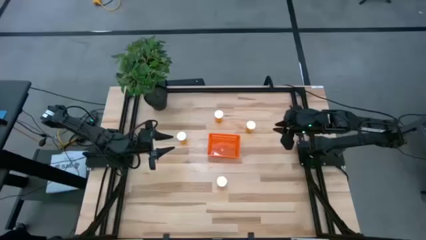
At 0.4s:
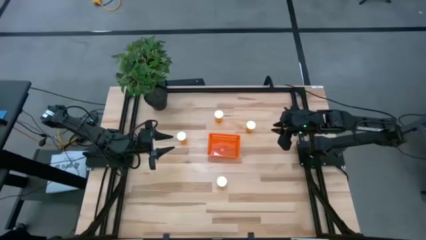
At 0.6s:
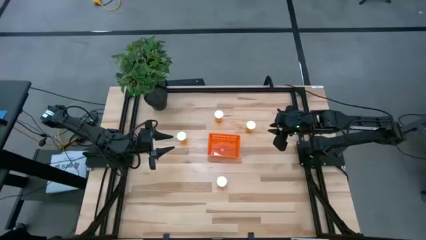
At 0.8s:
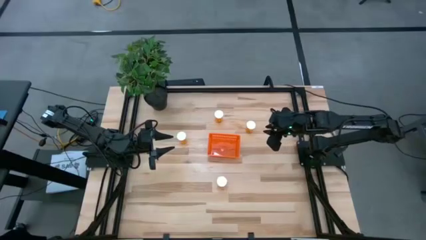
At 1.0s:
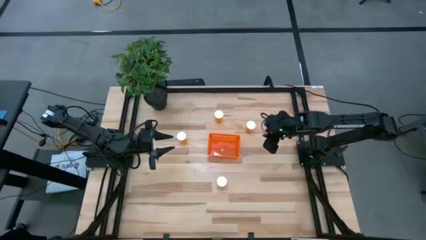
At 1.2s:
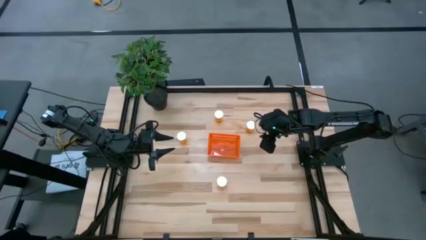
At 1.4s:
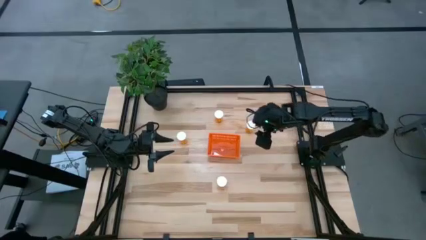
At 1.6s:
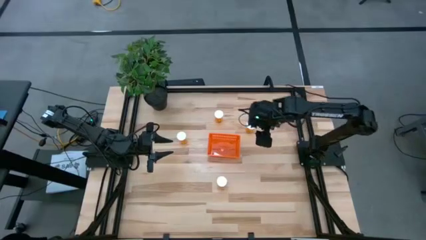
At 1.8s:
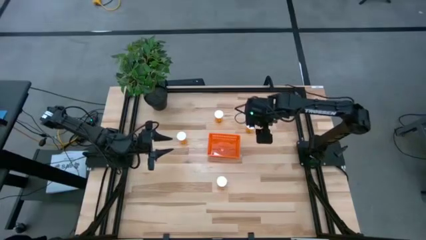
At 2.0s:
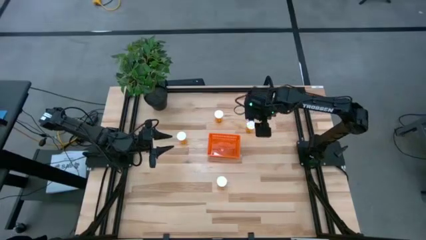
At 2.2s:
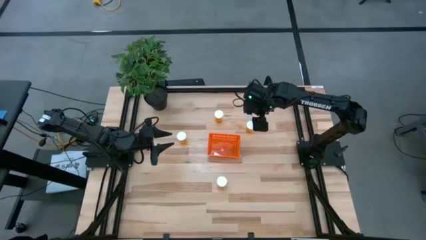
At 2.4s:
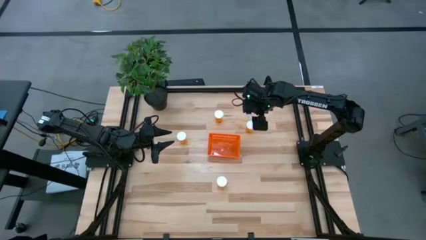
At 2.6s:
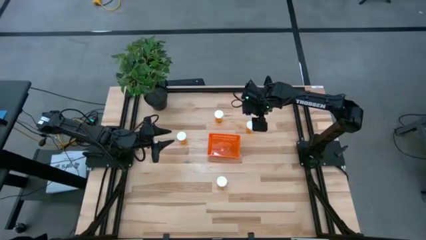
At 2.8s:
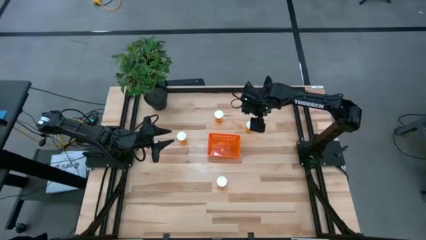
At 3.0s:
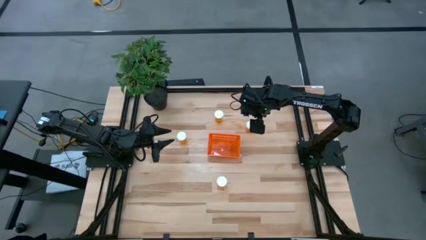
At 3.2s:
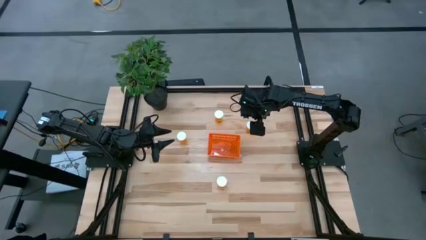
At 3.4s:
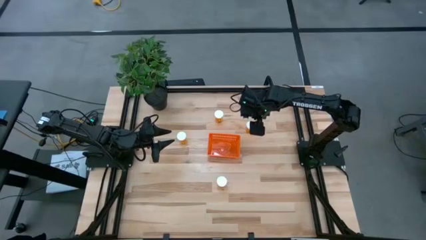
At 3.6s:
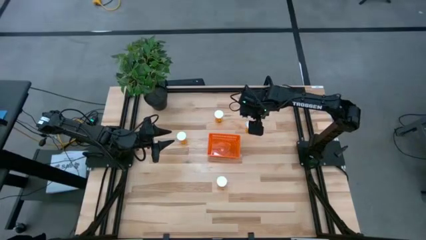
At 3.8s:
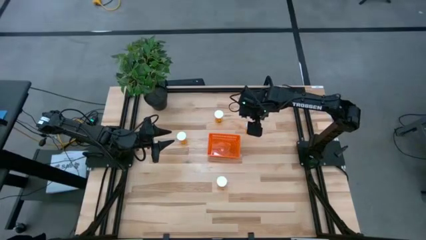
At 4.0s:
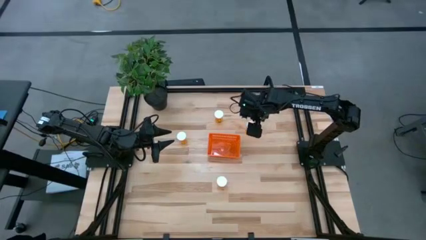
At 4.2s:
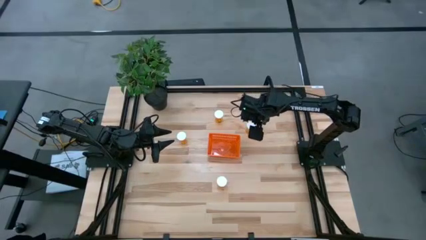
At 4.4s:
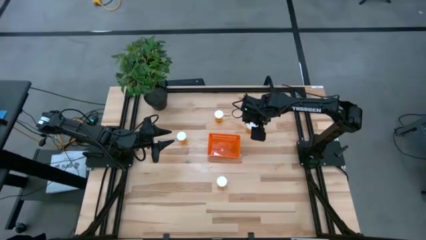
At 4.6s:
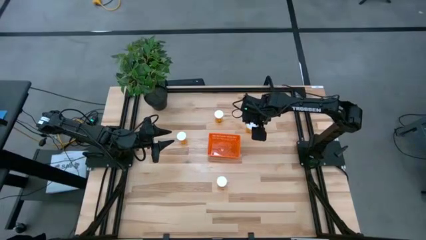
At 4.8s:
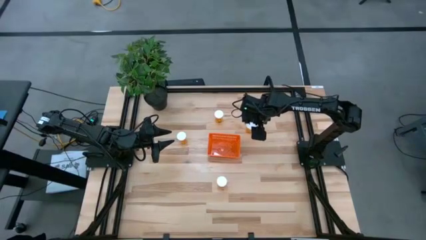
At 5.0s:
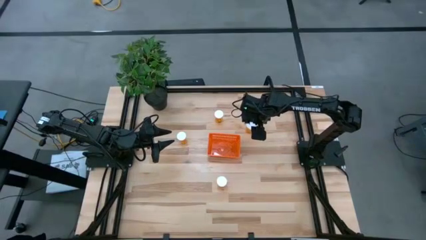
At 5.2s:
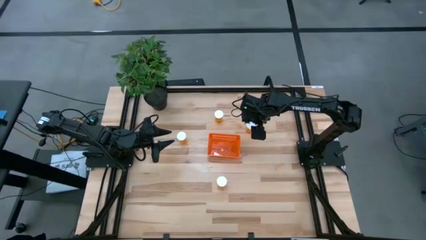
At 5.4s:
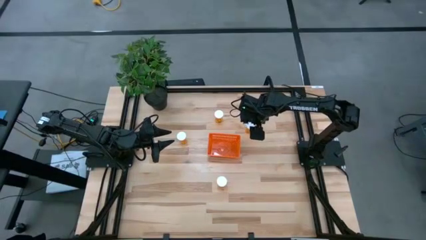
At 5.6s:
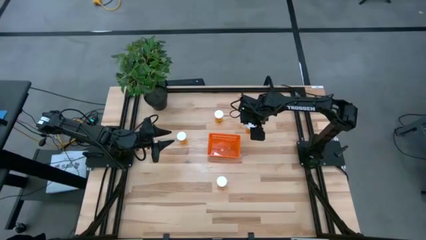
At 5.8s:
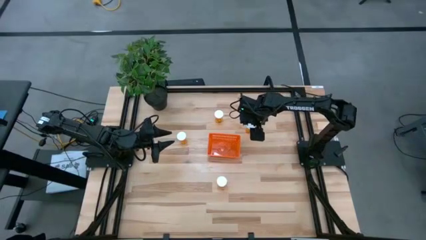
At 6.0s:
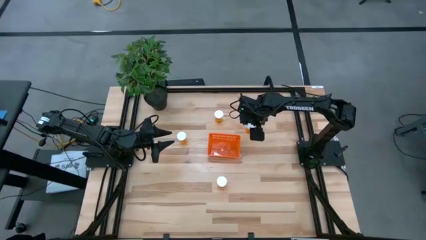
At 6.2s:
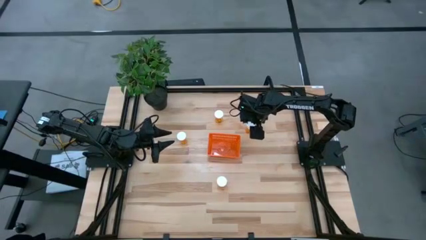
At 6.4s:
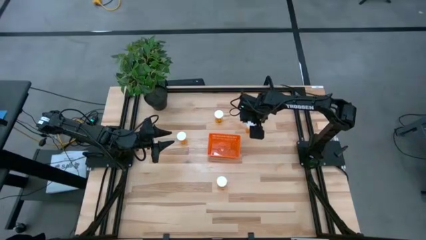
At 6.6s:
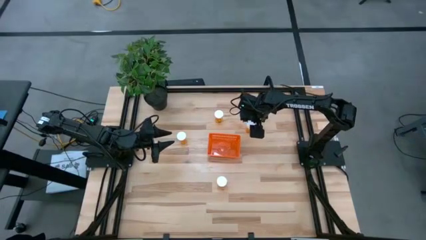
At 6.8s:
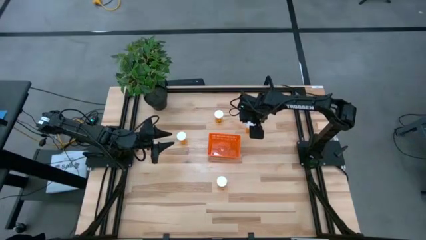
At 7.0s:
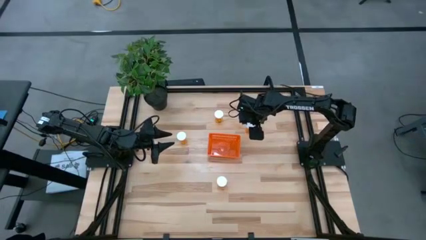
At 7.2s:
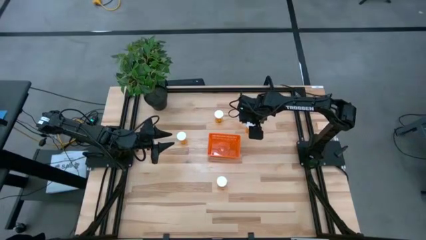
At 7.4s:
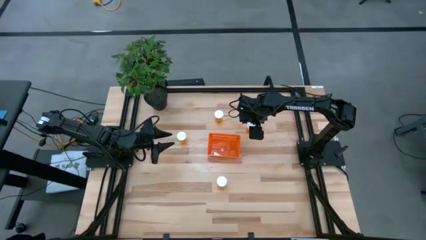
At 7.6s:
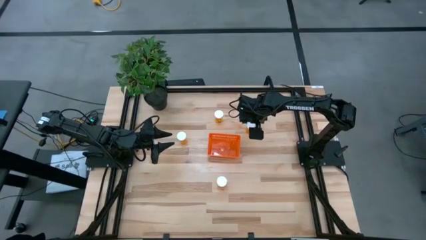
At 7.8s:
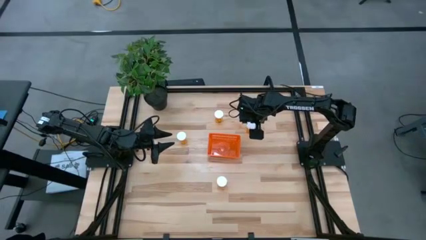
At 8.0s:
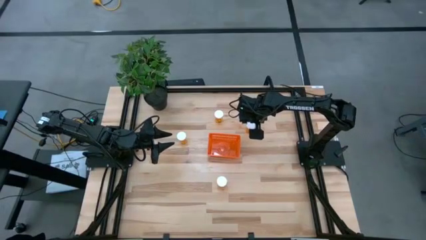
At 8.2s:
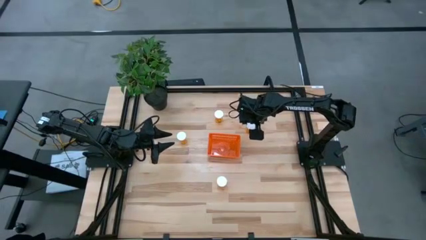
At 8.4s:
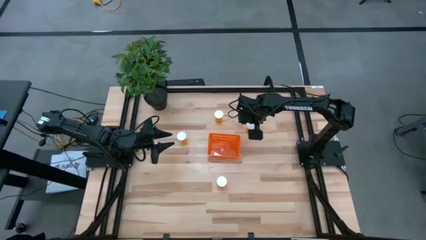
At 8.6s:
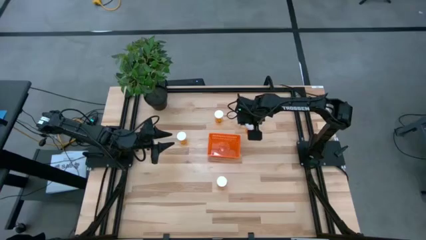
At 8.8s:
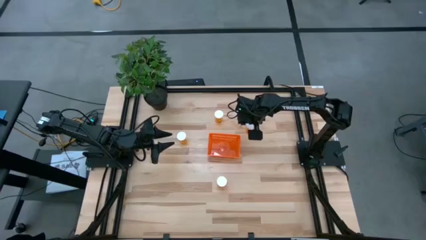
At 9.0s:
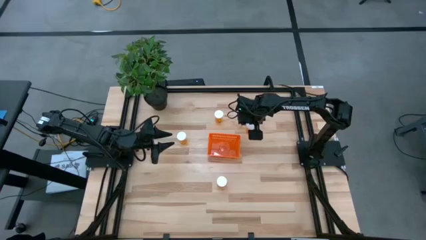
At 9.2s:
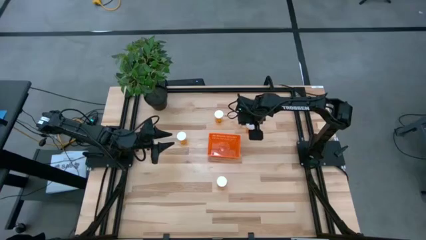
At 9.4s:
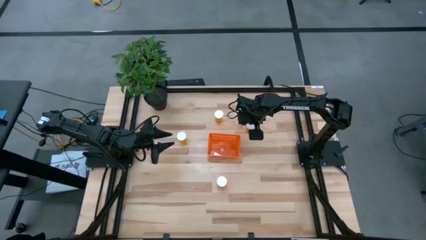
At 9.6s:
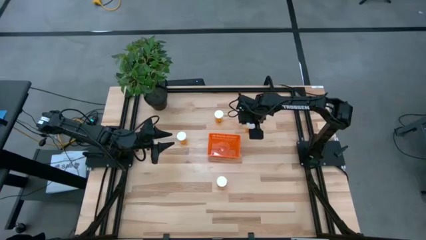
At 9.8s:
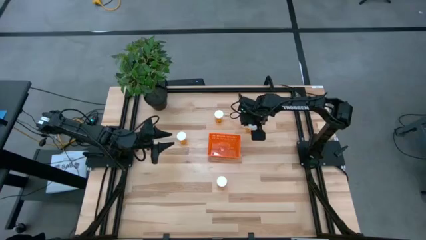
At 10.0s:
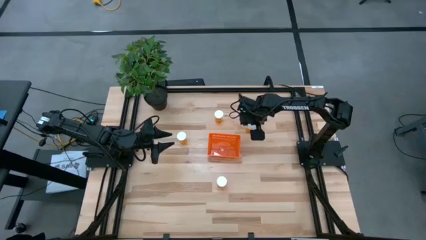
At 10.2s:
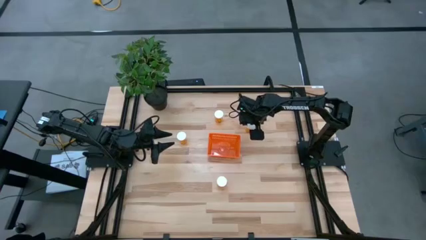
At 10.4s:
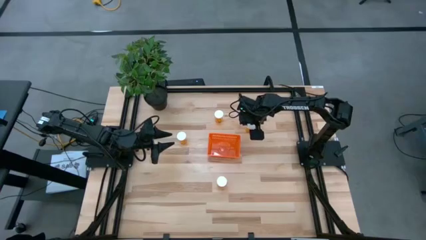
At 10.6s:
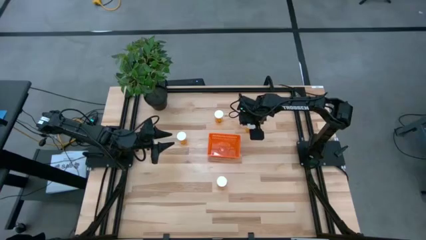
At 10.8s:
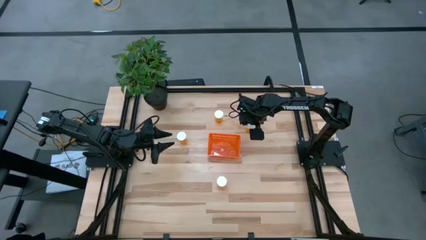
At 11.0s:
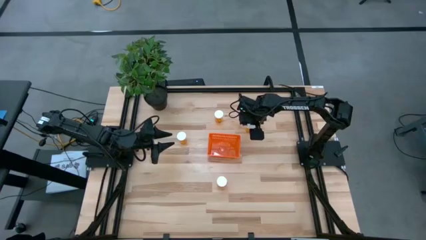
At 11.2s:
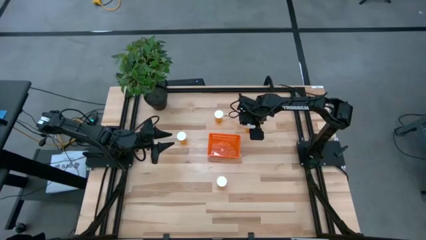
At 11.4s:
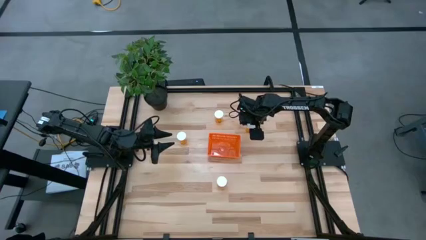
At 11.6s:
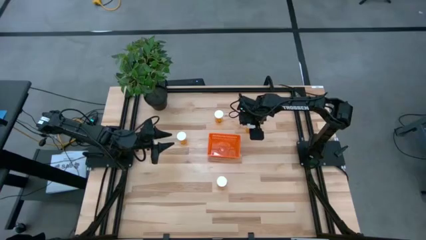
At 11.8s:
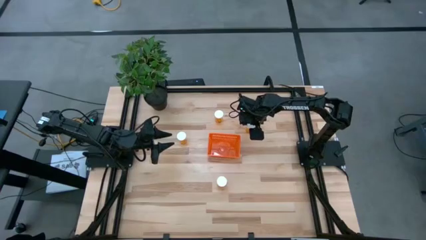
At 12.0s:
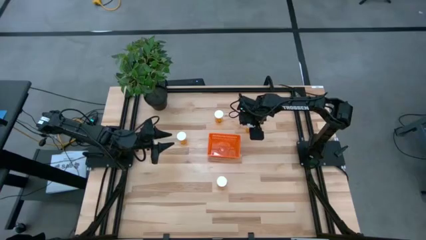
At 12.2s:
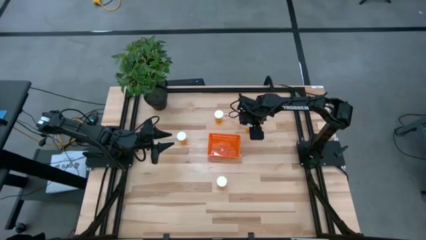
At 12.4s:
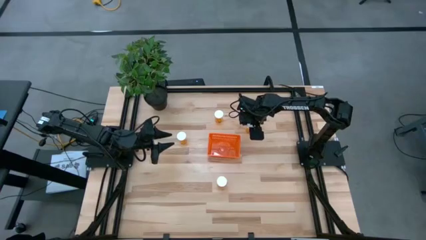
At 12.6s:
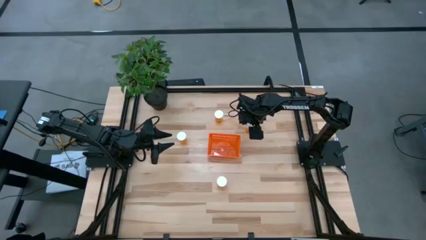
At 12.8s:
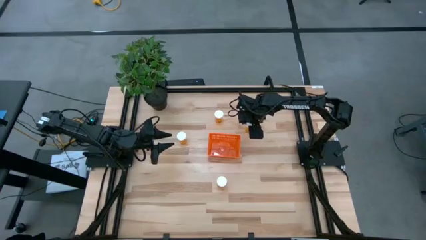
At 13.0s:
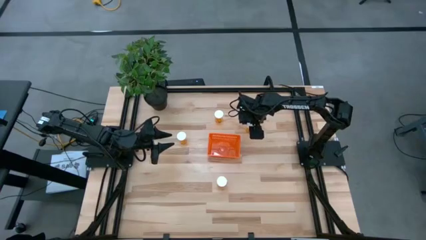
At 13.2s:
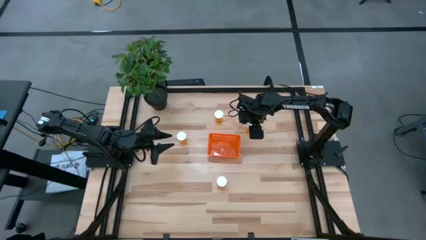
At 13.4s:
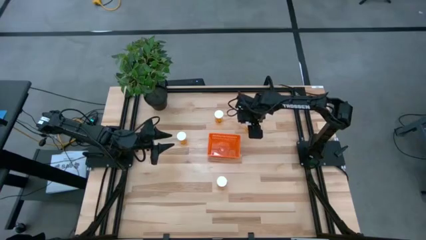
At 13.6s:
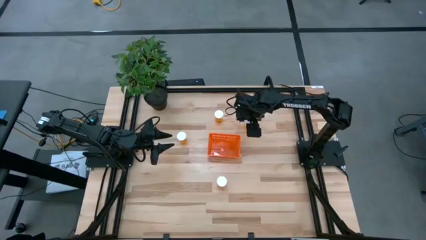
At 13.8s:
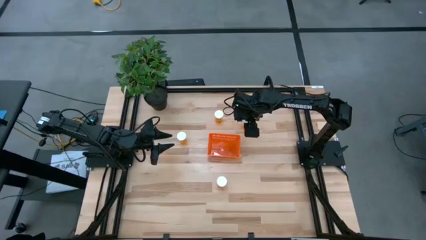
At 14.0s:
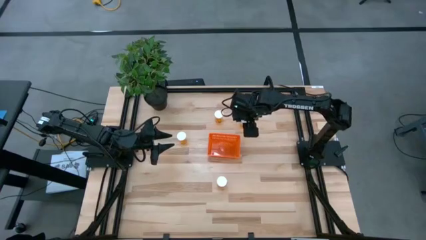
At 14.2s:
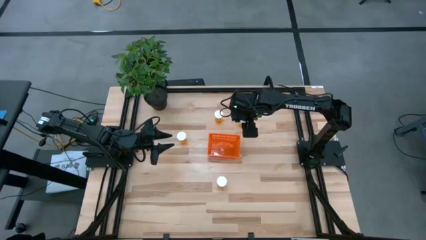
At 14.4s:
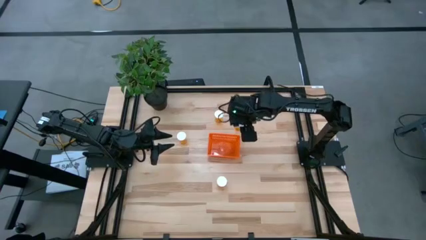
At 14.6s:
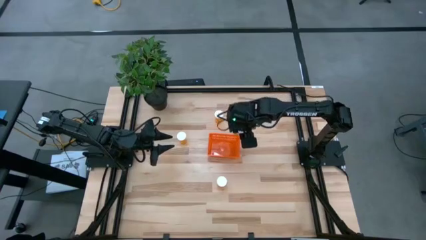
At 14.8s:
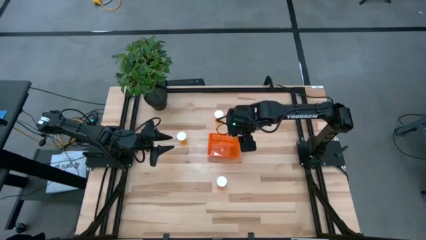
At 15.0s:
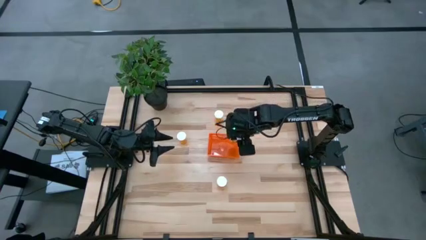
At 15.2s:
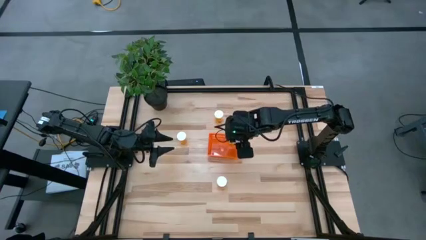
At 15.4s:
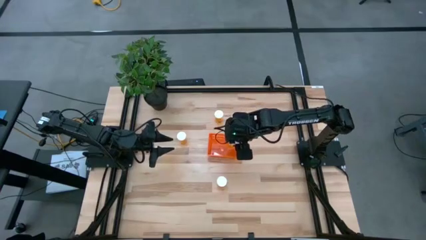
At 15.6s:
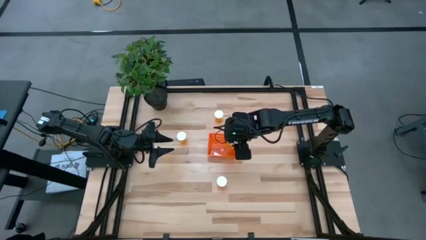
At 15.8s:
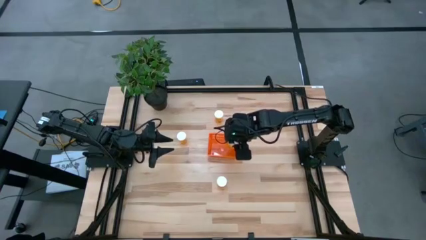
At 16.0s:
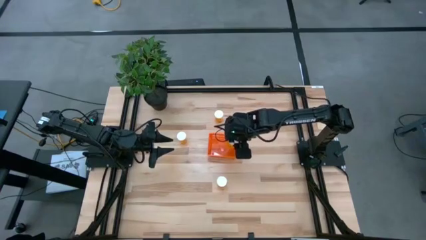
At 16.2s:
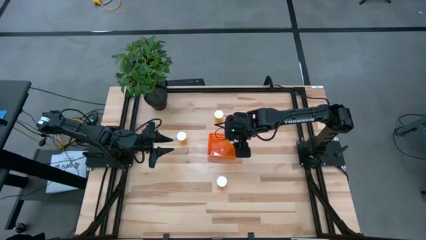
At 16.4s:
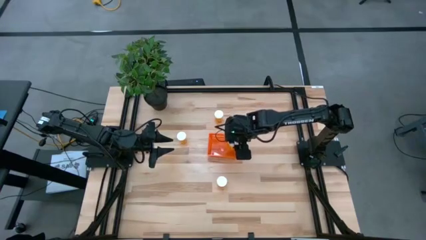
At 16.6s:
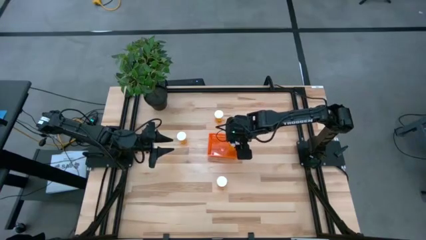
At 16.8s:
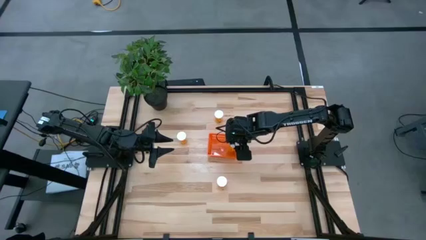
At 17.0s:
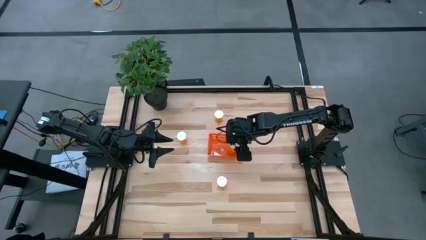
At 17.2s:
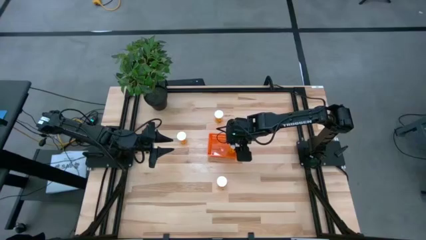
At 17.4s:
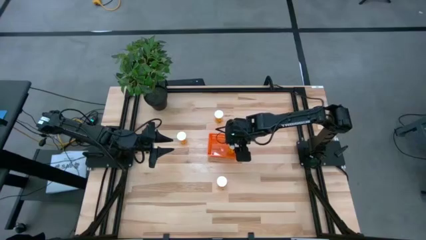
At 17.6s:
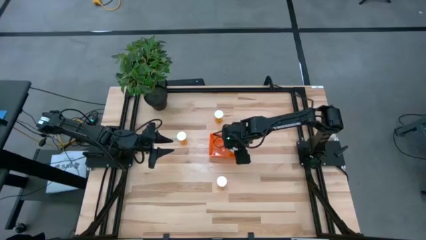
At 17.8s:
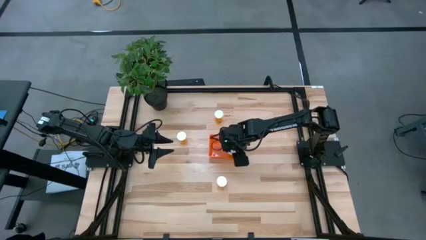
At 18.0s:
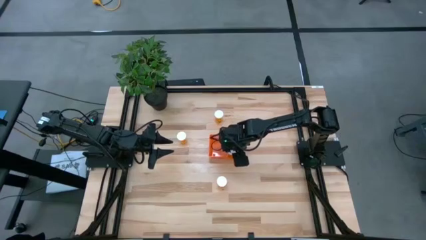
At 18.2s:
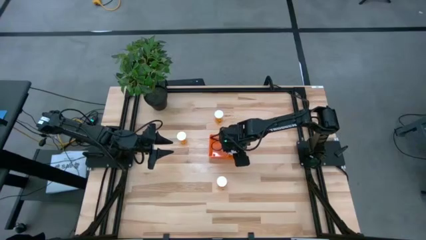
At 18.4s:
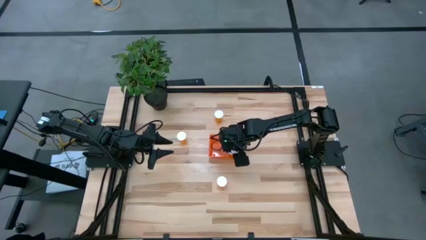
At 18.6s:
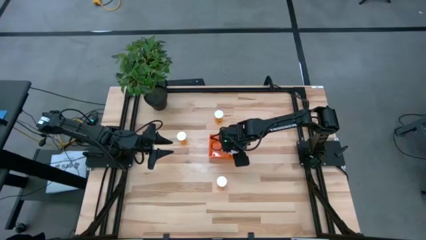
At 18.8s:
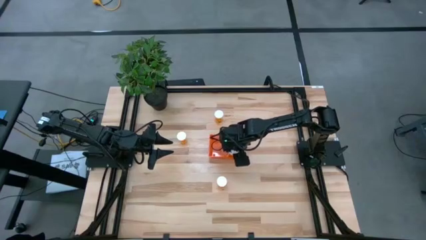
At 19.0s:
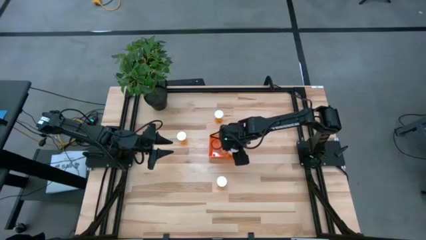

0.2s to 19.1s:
Task: Pick and place pill bottles into a basket
Put the orange medicine bottle into the orange basket
